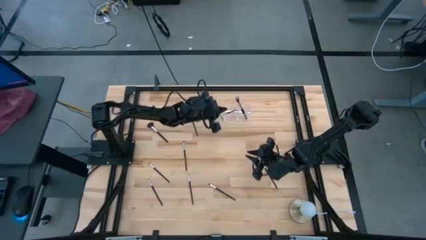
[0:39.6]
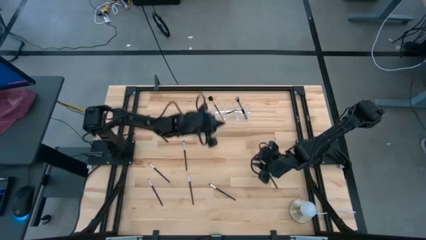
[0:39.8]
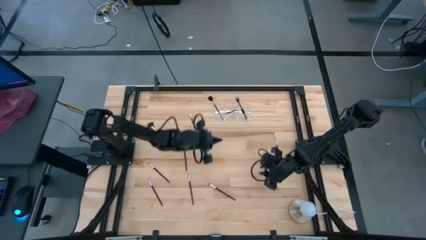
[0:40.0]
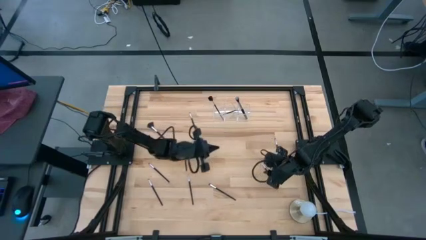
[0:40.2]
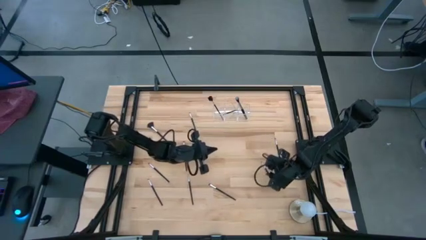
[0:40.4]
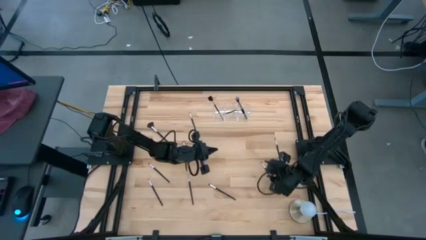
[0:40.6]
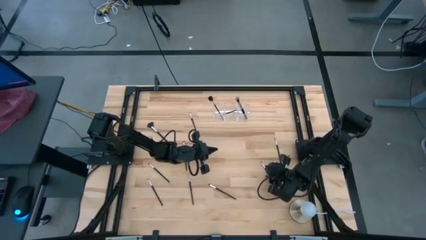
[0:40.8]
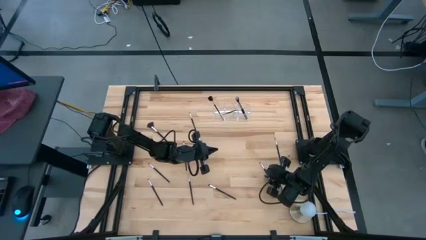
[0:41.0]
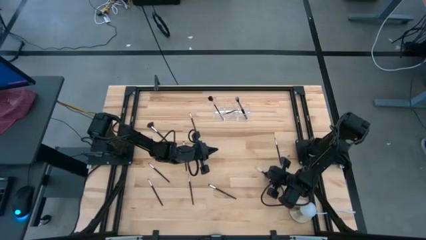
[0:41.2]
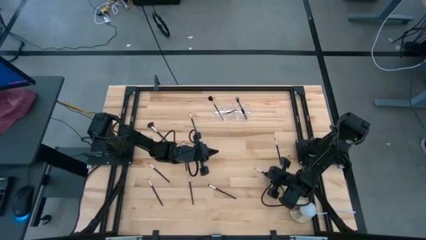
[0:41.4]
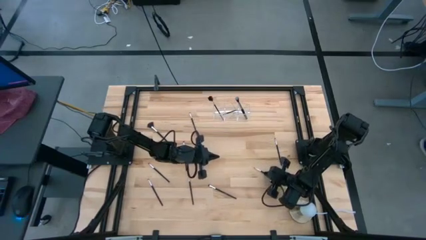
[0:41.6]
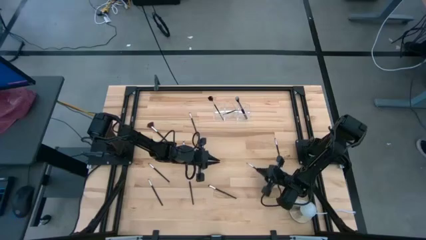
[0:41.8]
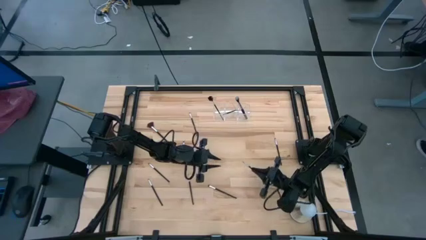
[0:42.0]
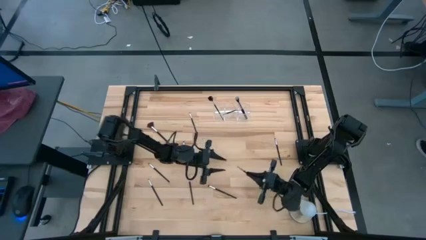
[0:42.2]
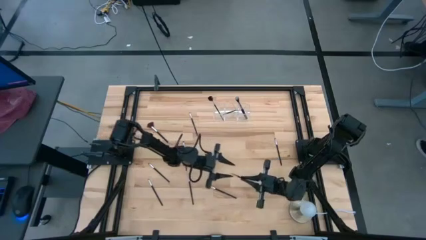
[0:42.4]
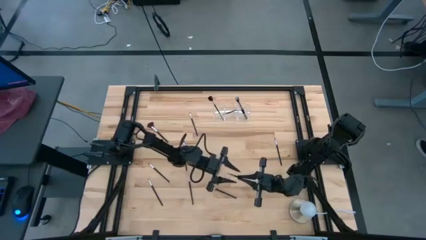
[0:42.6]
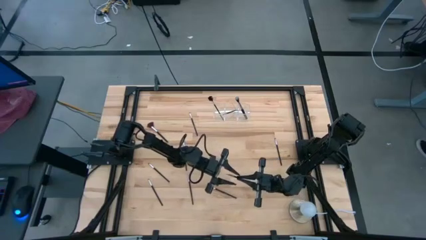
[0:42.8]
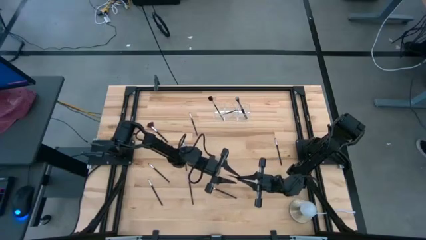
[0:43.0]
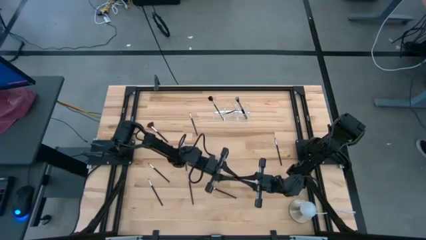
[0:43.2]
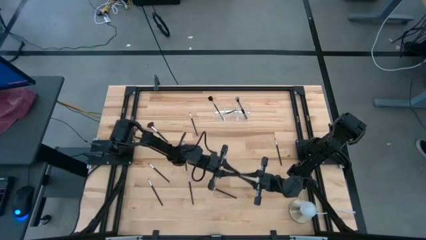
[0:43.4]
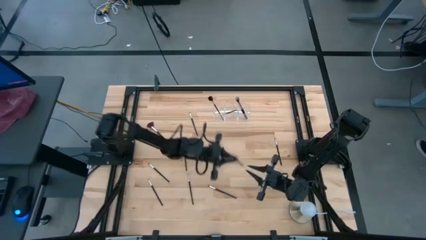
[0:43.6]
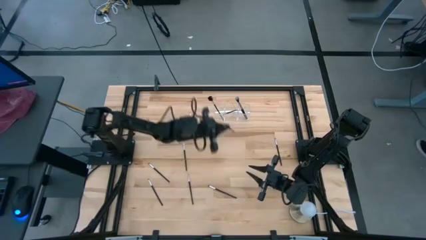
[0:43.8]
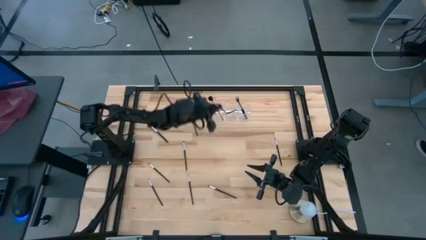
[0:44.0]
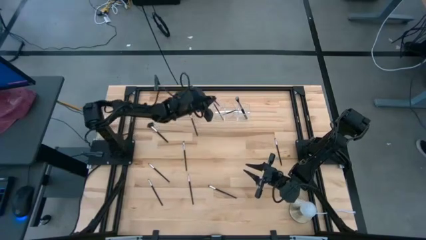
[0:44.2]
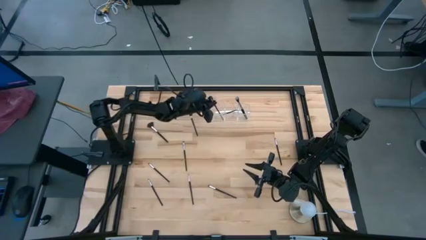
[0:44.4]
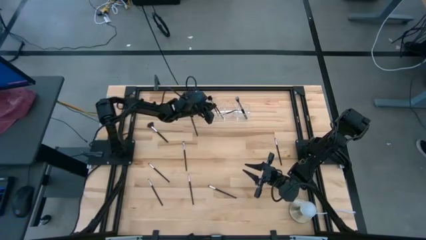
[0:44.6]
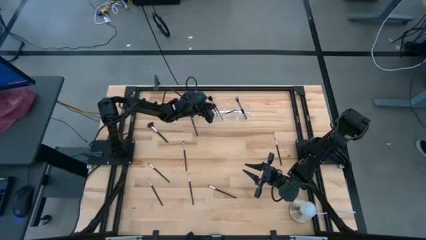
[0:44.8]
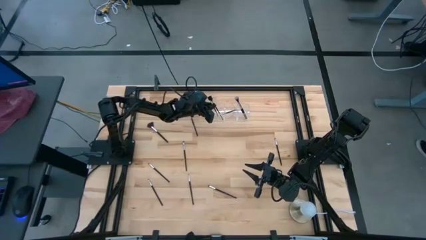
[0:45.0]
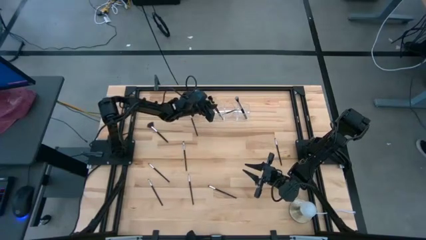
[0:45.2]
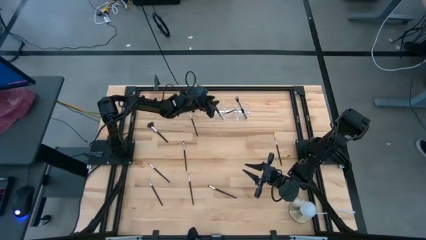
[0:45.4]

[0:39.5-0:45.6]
Task: Put items in baskets/containers
Put the black eyeshadow brush into the transparent organizer

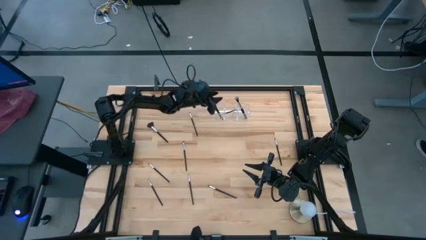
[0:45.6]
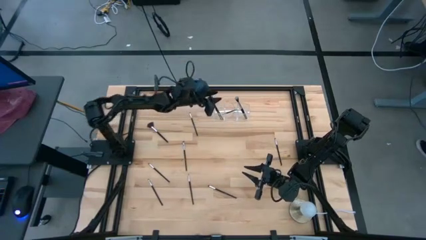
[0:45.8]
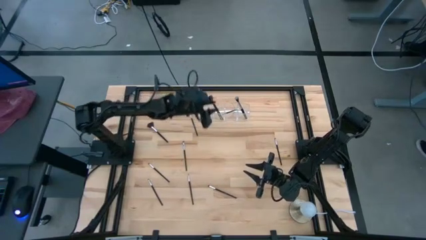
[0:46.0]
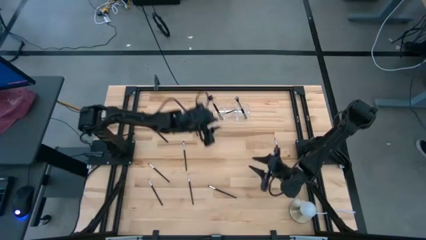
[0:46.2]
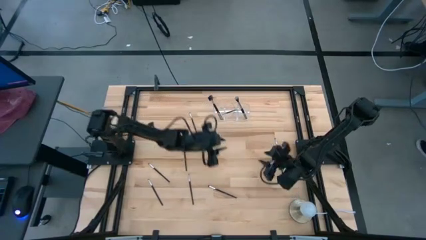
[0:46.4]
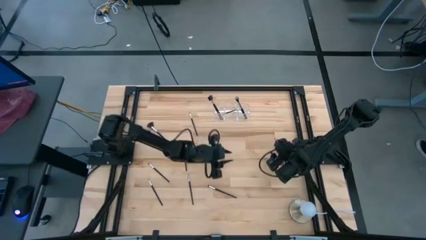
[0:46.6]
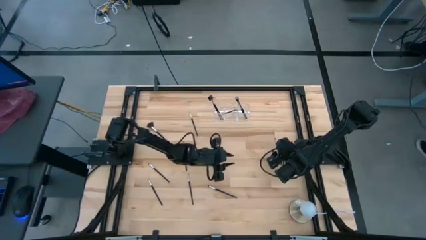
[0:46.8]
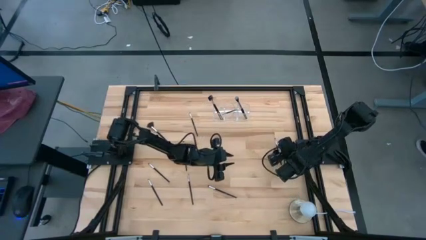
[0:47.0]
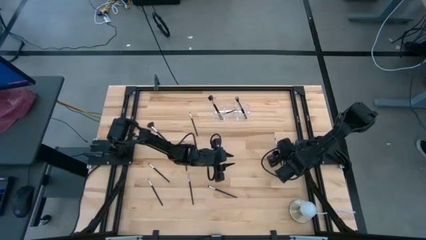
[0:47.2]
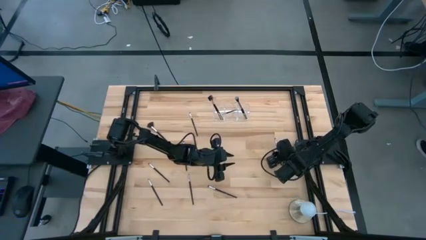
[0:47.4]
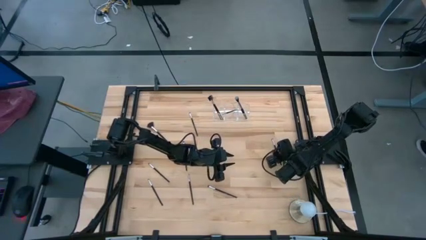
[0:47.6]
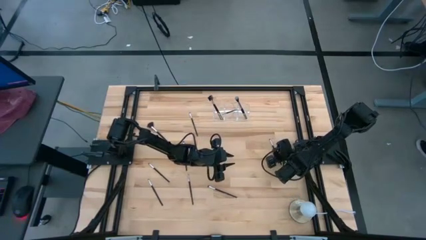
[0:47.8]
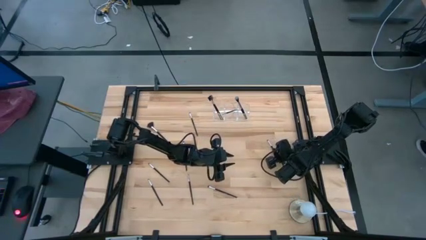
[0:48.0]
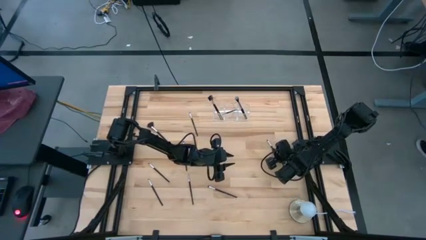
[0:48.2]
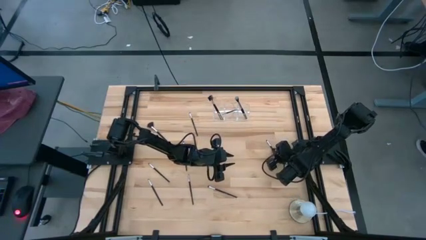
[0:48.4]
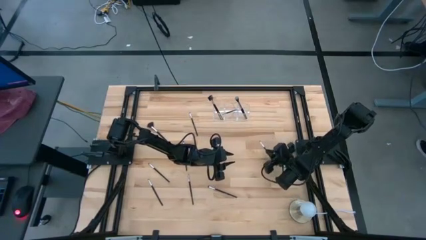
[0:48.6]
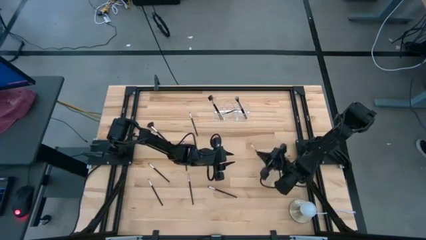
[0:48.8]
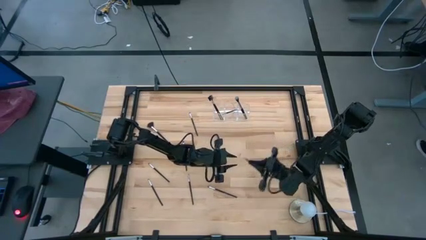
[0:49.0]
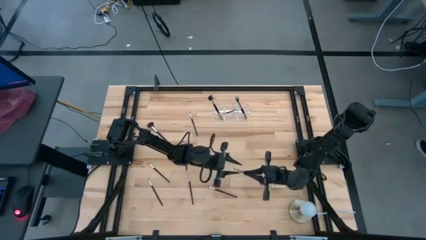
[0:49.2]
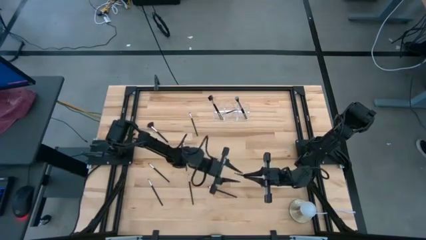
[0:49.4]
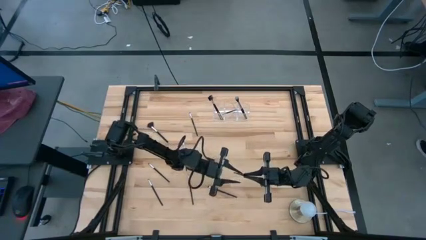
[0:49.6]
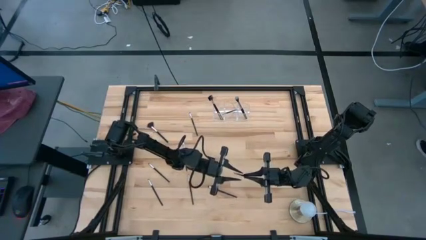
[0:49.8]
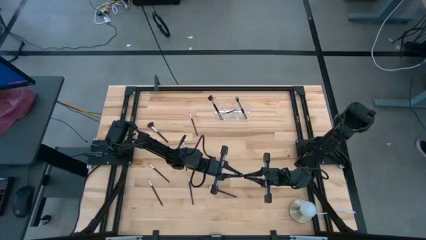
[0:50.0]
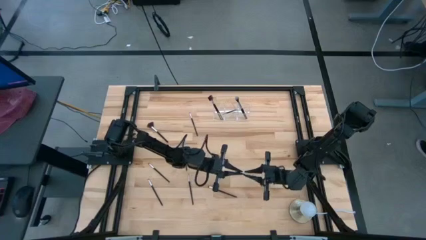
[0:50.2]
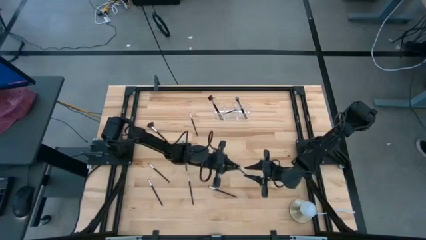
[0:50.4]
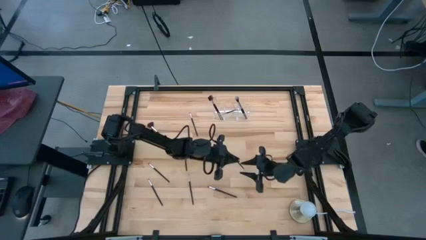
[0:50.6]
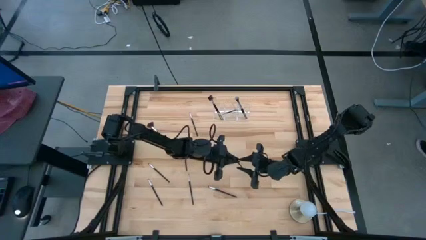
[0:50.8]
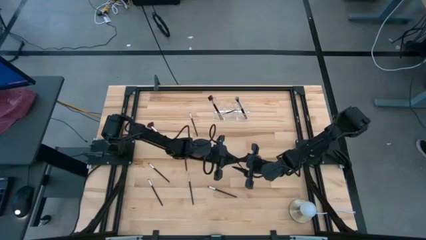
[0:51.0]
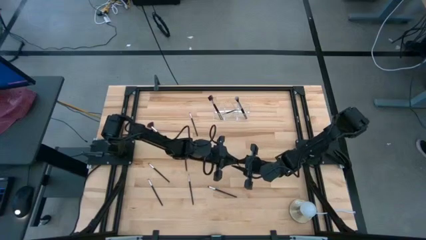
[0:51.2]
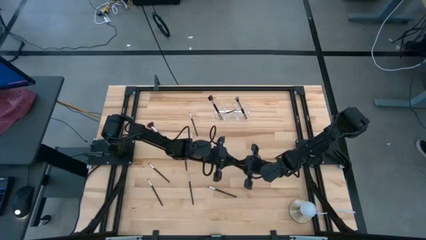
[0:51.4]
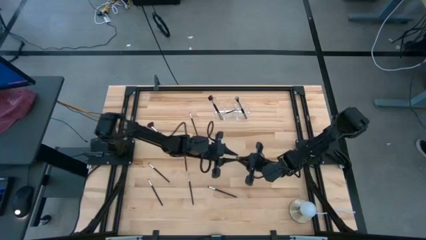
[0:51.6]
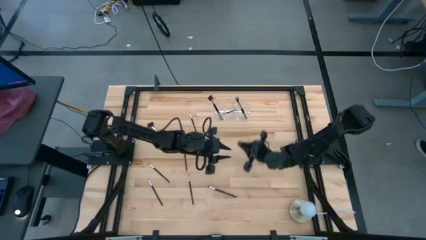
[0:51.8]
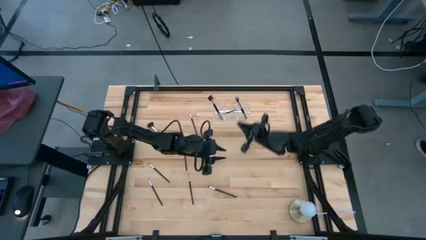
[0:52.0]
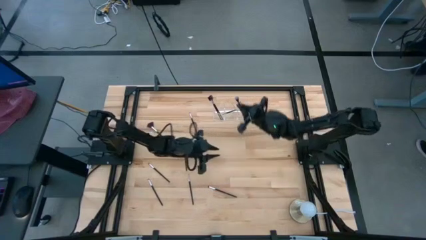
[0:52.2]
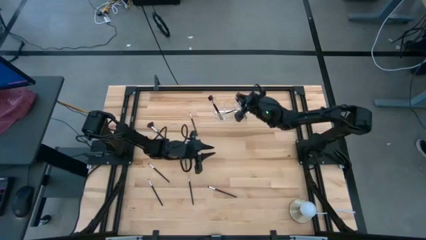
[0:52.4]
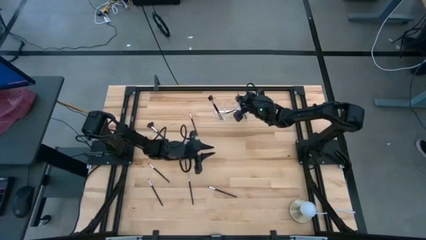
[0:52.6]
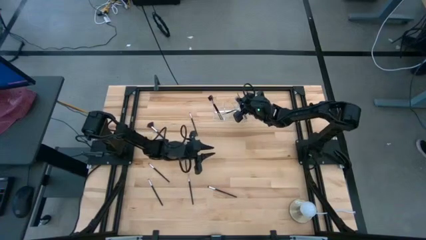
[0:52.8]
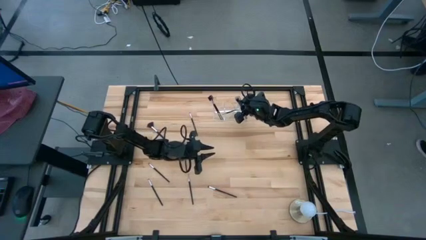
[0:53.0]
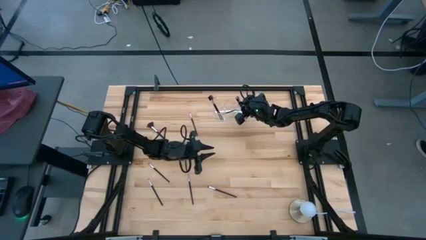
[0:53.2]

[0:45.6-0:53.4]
Put the black eyeshadow brush into the transparent organizer

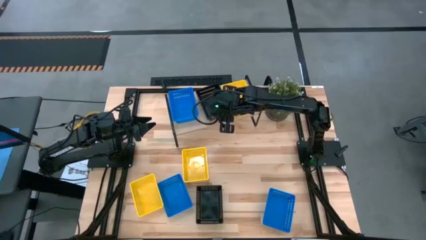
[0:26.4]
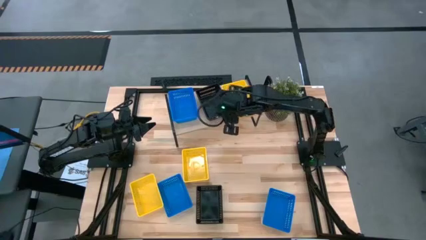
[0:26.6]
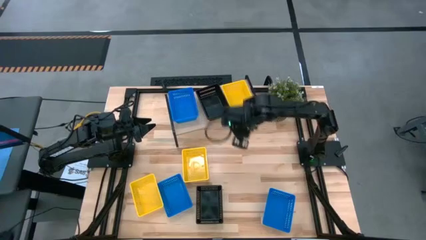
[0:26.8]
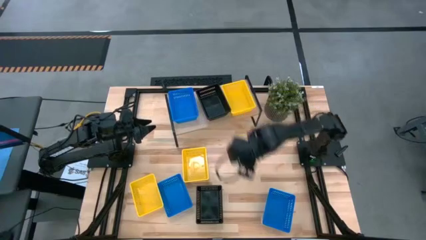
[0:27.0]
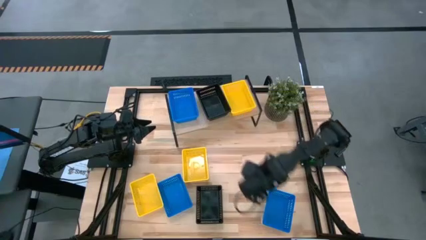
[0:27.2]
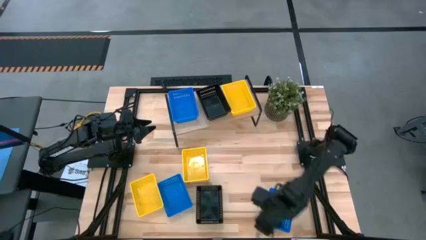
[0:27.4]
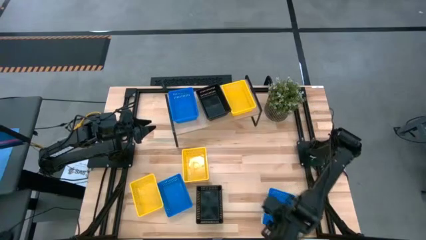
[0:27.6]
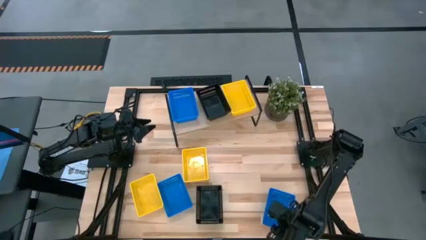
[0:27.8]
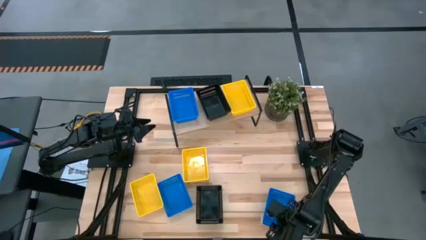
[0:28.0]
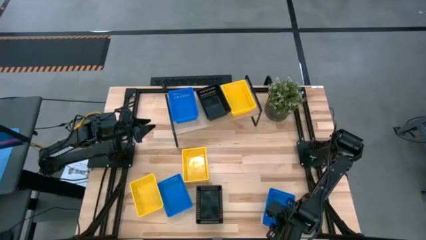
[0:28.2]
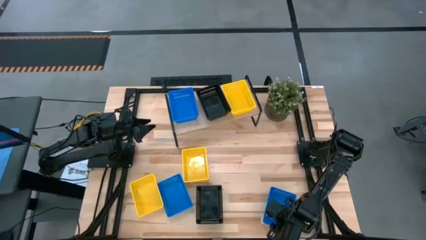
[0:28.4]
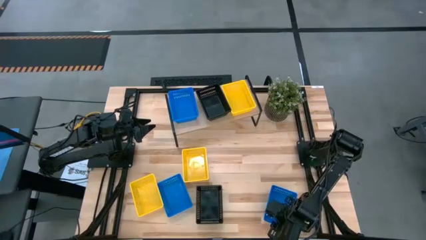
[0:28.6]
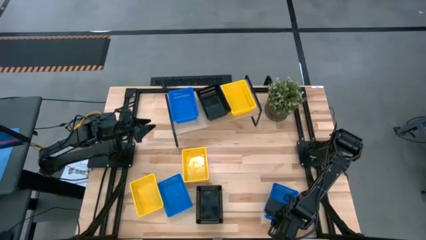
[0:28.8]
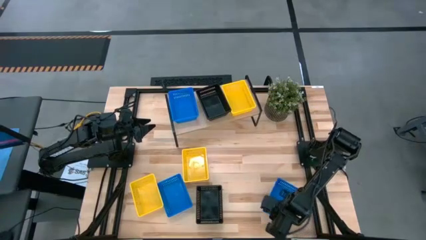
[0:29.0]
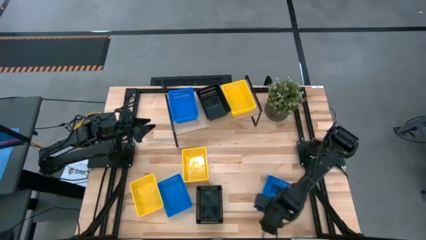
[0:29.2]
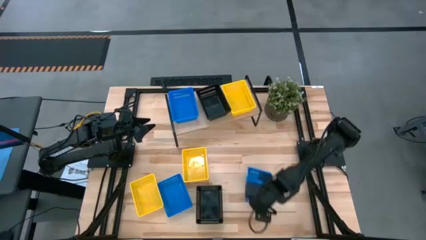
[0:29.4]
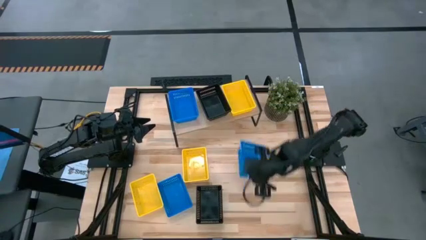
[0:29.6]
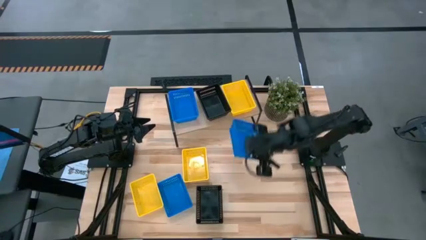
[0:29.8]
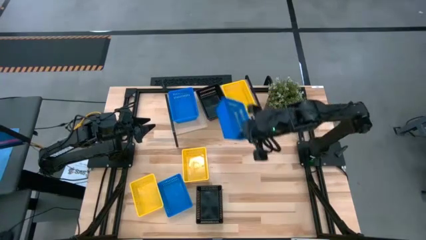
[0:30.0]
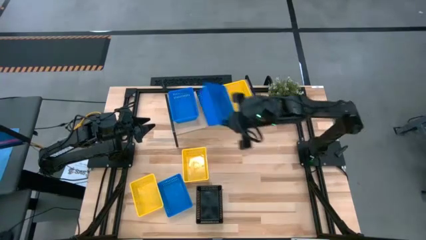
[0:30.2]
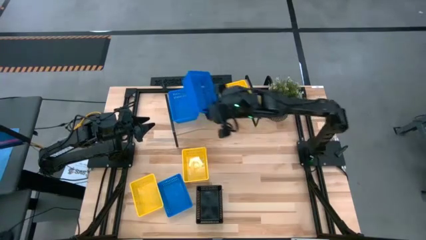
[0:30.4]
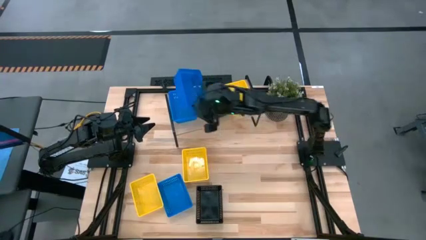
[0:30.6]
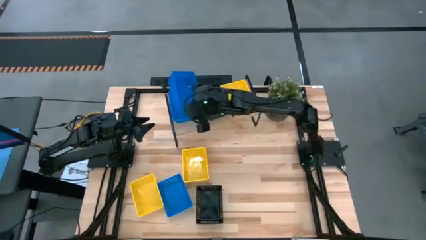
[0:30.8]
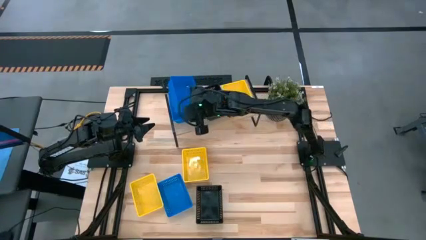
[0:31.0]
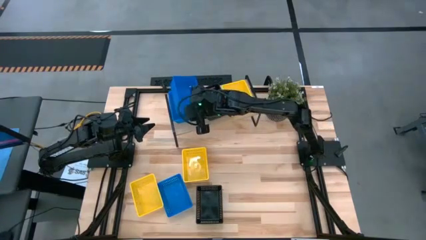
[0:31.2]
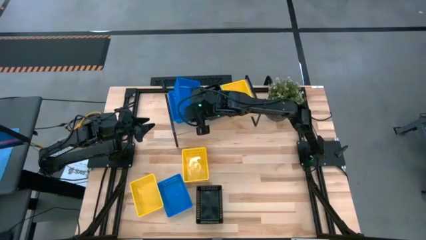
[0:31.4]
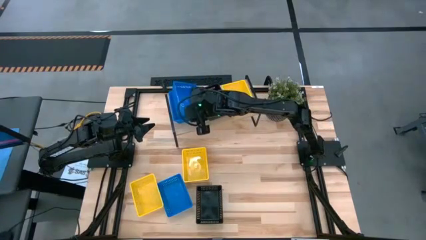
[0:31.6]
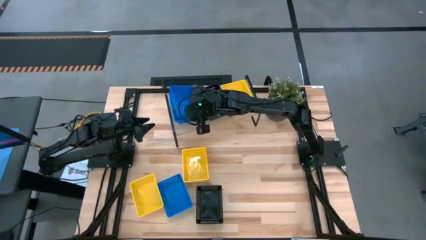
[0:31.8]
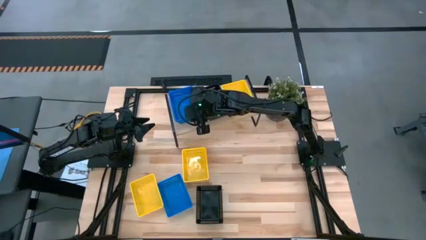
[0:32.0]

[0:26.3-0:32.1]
Task: Stack baskets on shelf by color
Stack the right blue bin on the blue bin on the shelf
